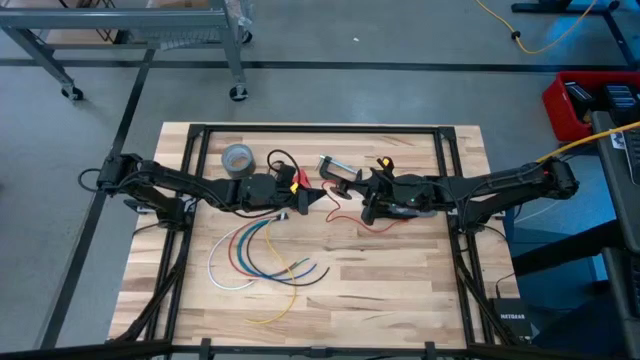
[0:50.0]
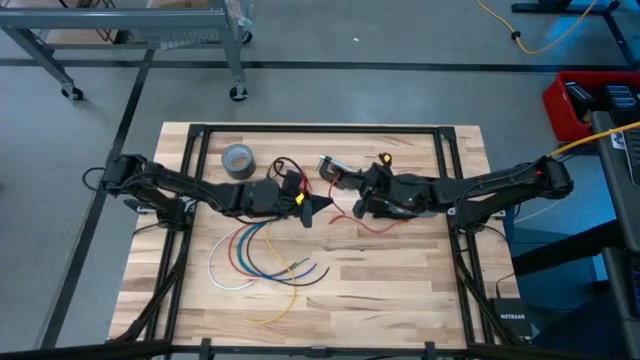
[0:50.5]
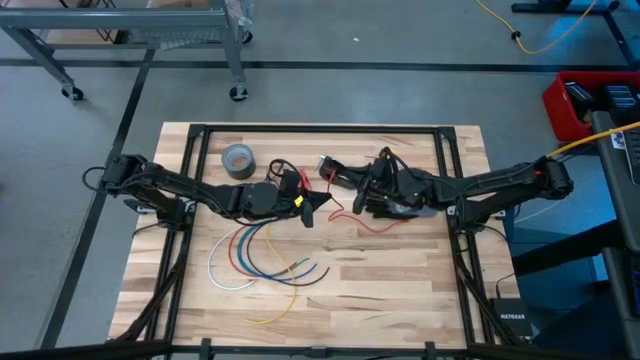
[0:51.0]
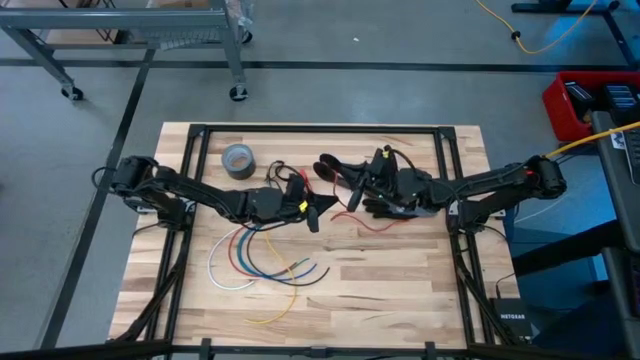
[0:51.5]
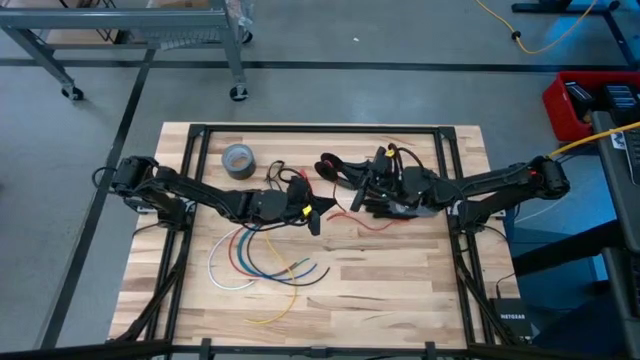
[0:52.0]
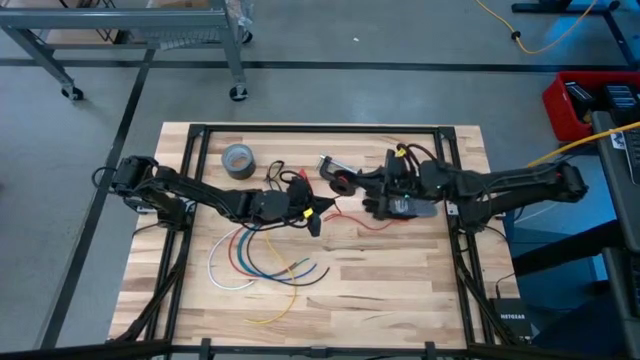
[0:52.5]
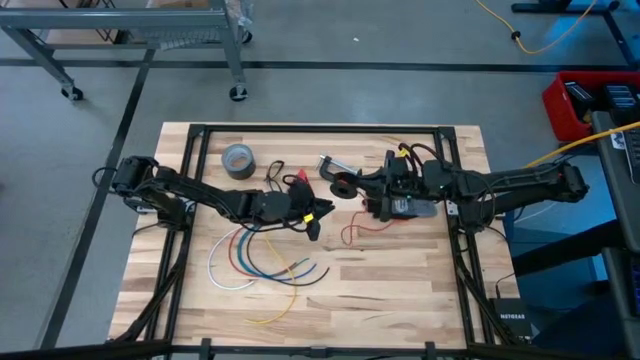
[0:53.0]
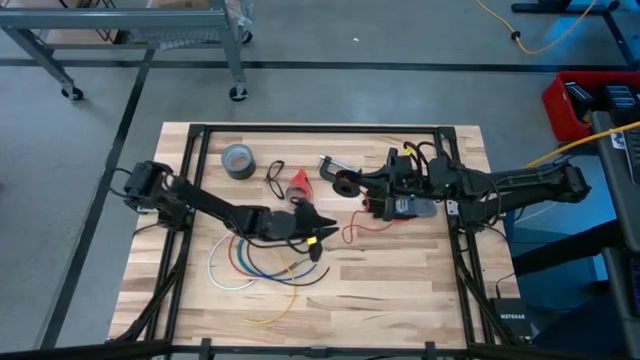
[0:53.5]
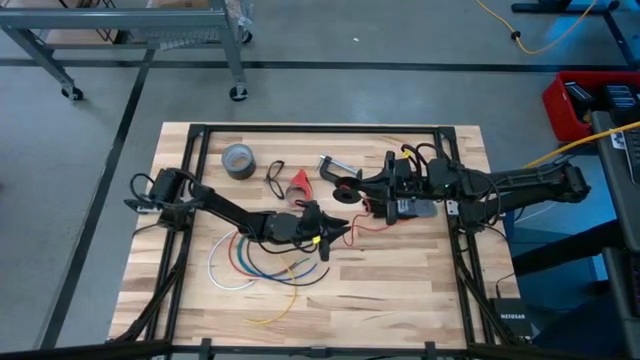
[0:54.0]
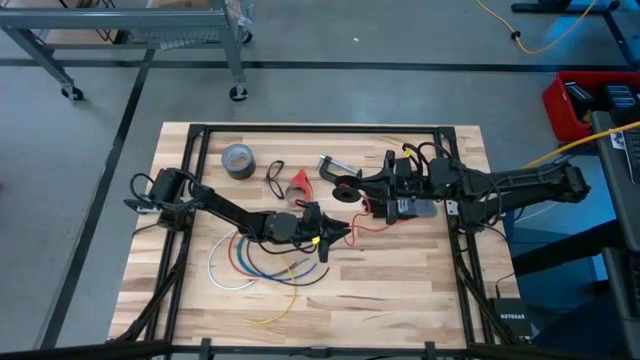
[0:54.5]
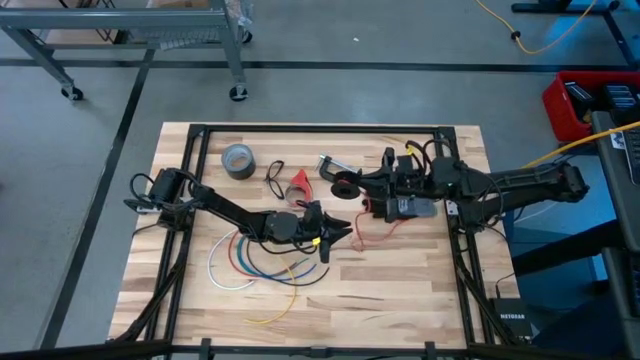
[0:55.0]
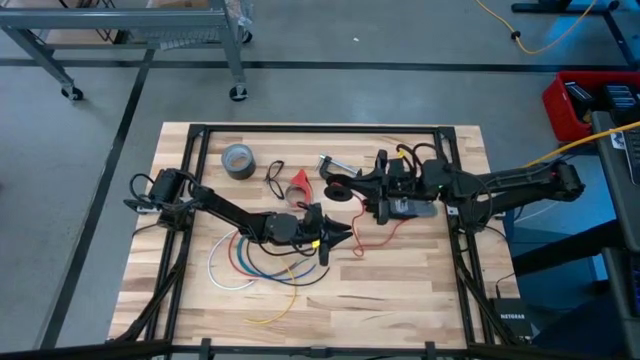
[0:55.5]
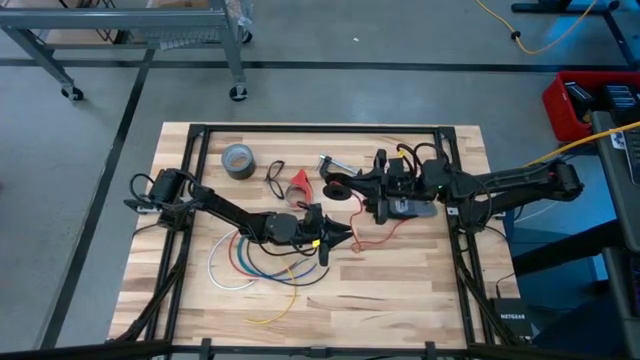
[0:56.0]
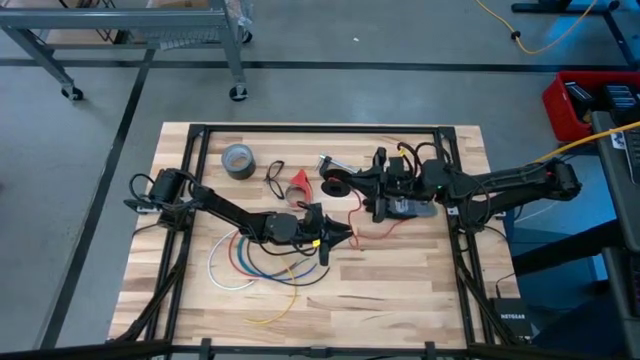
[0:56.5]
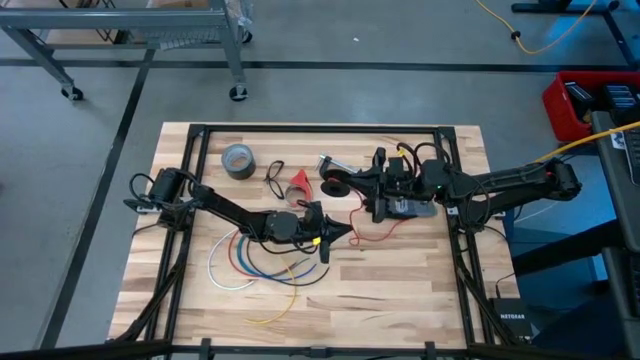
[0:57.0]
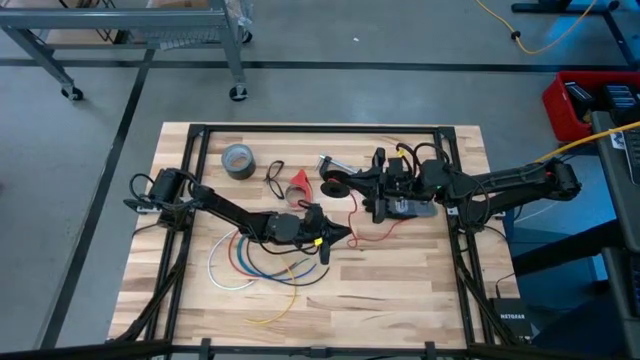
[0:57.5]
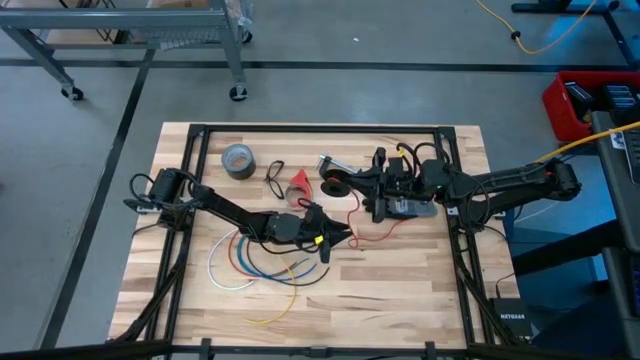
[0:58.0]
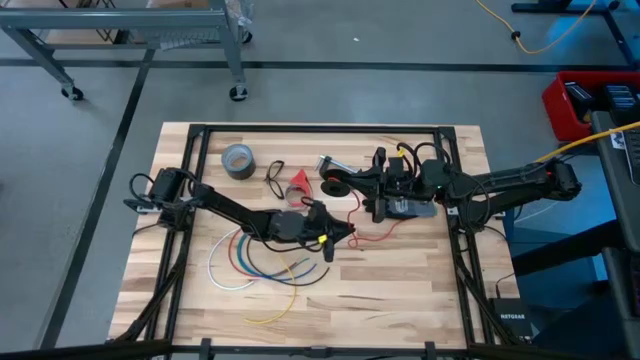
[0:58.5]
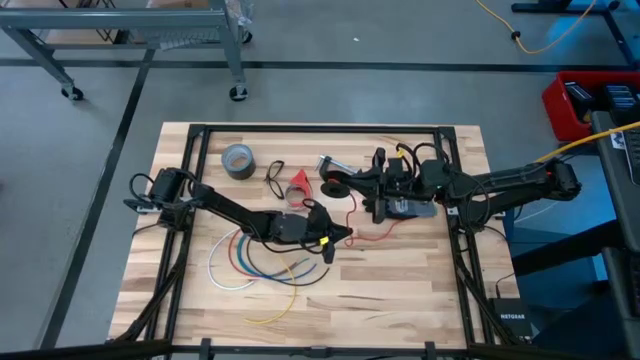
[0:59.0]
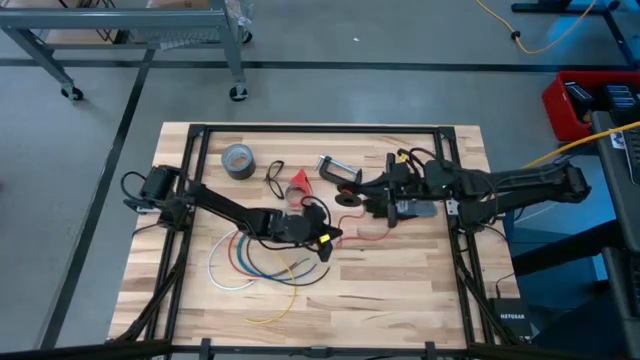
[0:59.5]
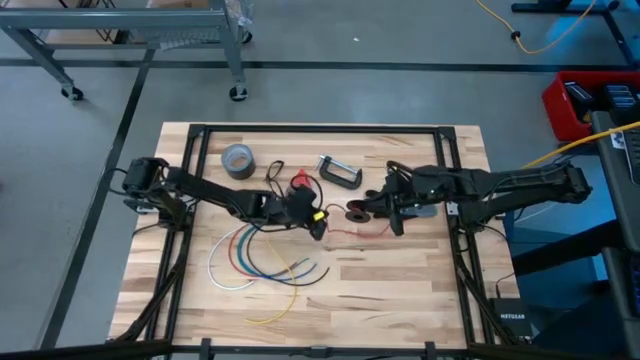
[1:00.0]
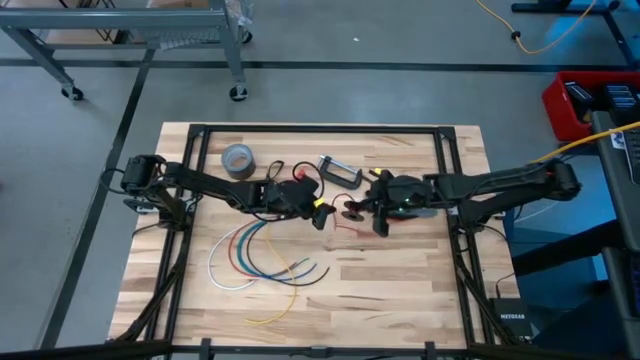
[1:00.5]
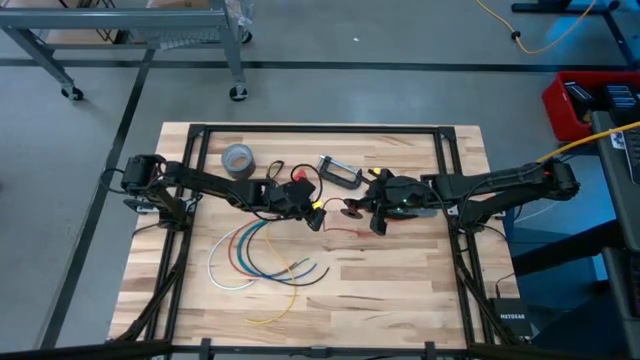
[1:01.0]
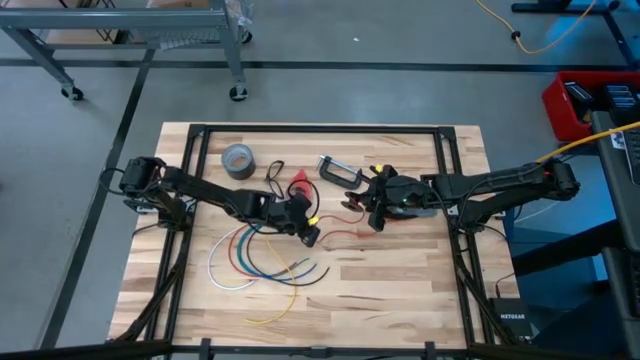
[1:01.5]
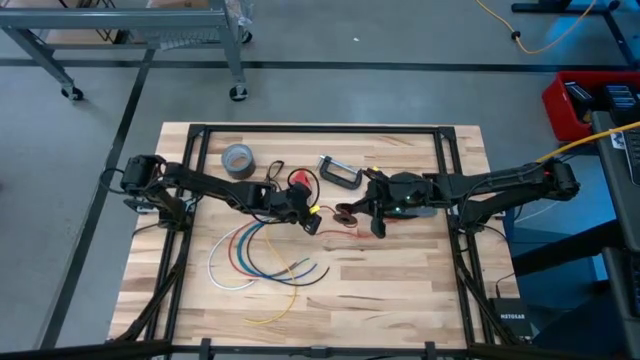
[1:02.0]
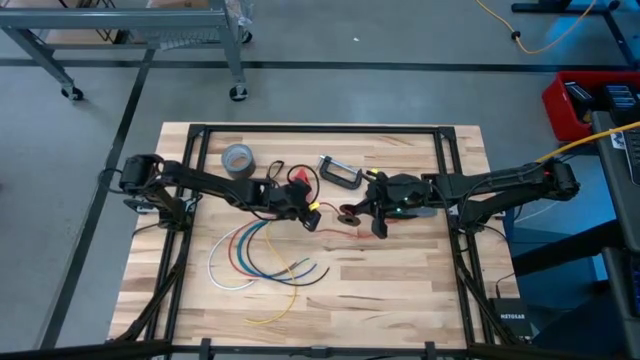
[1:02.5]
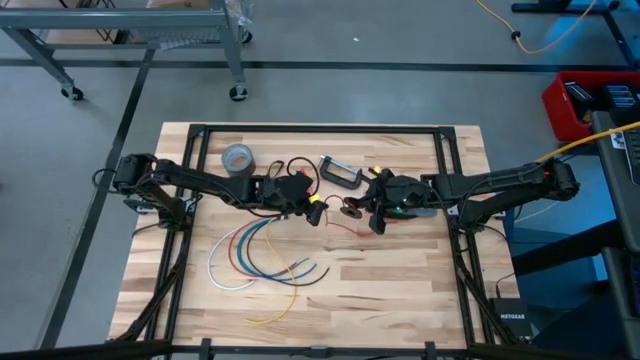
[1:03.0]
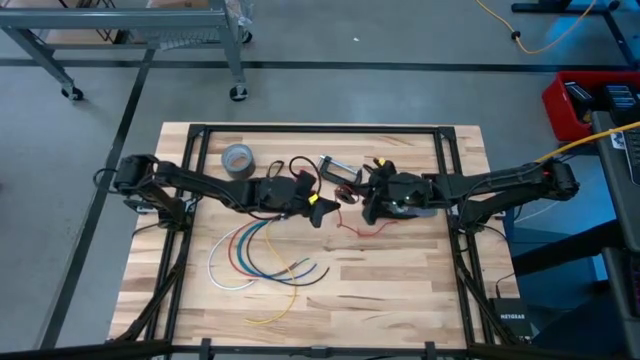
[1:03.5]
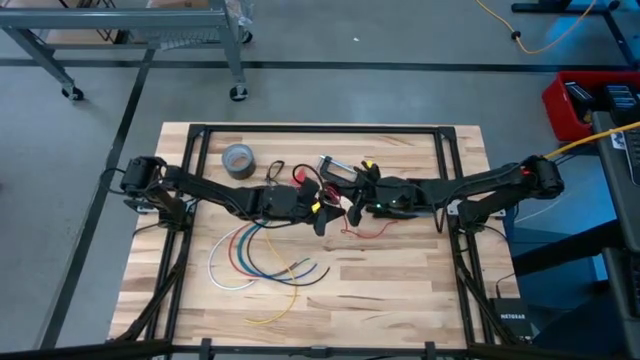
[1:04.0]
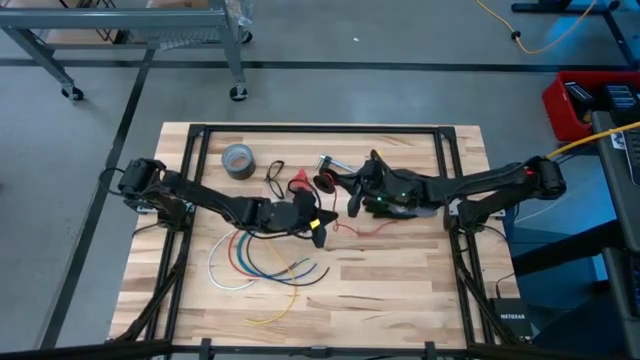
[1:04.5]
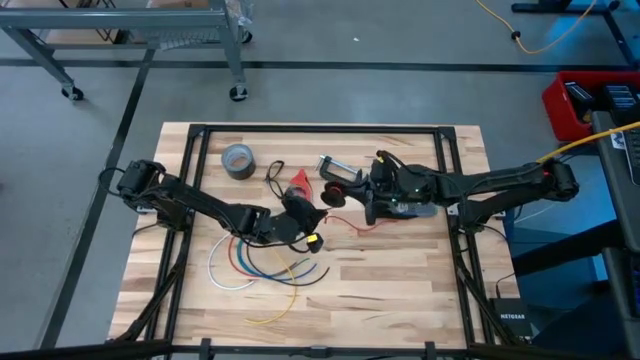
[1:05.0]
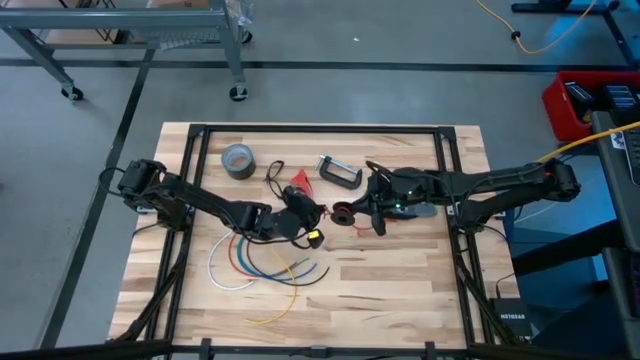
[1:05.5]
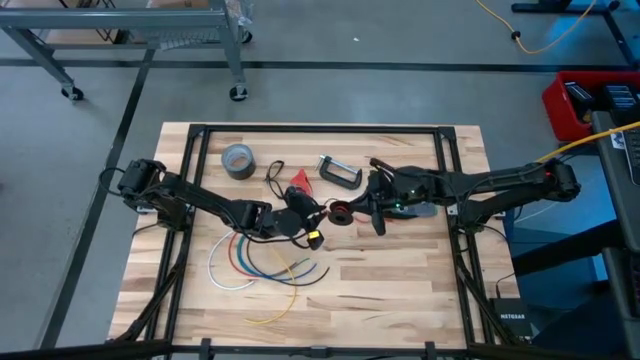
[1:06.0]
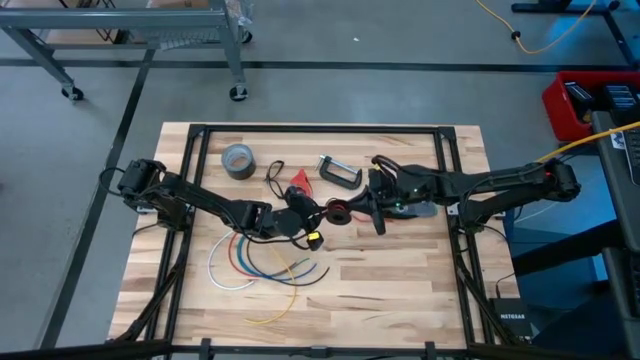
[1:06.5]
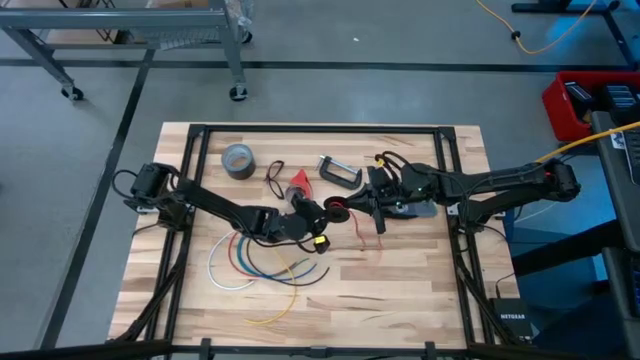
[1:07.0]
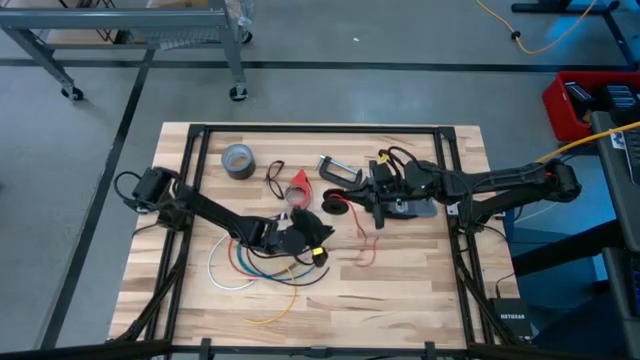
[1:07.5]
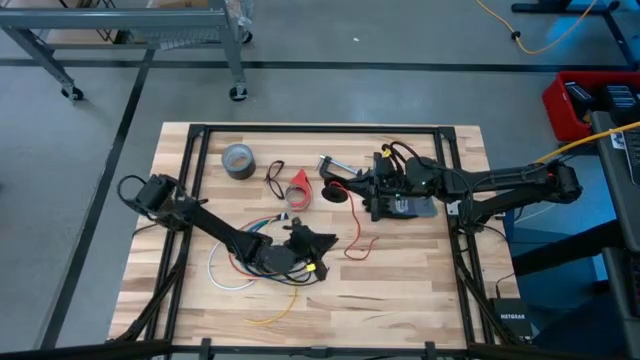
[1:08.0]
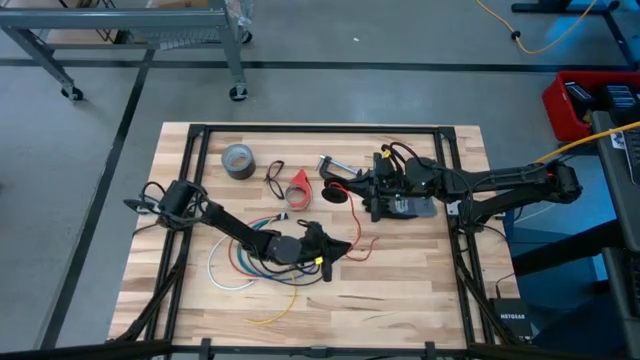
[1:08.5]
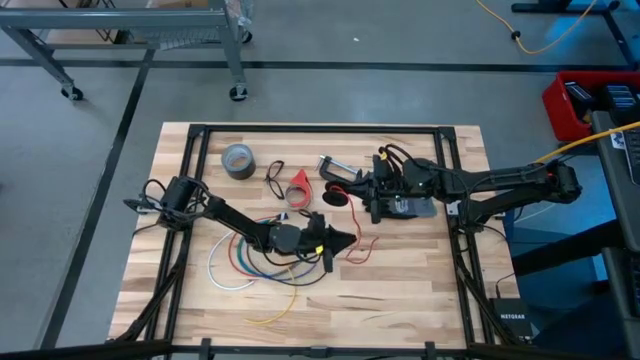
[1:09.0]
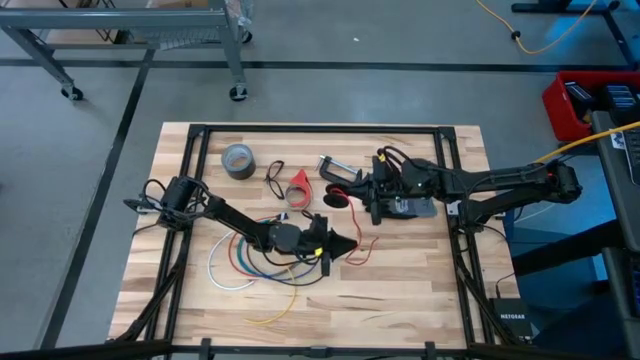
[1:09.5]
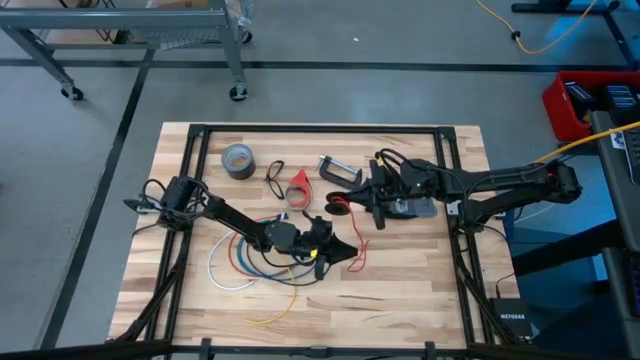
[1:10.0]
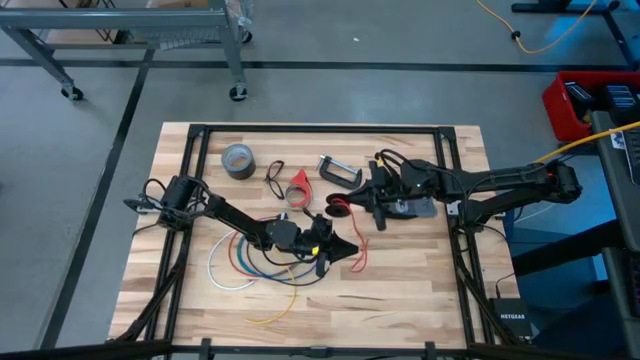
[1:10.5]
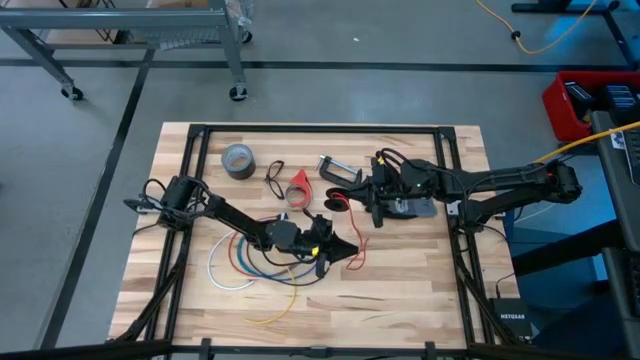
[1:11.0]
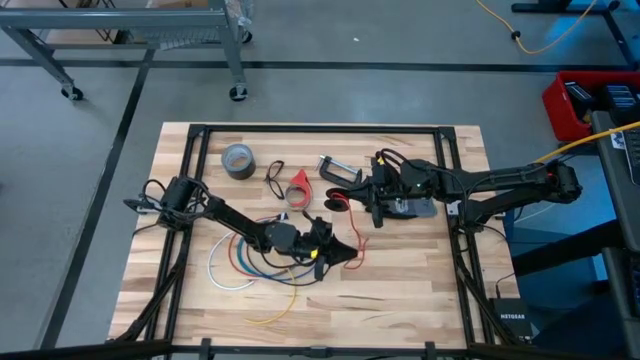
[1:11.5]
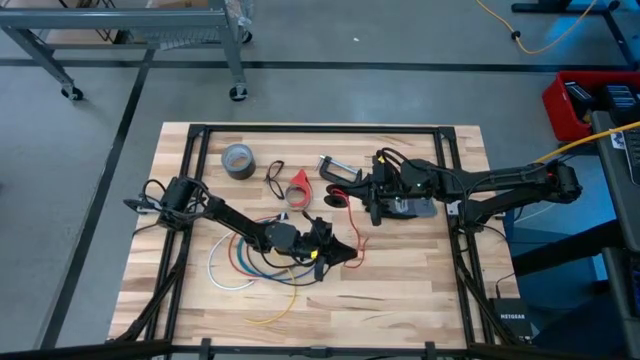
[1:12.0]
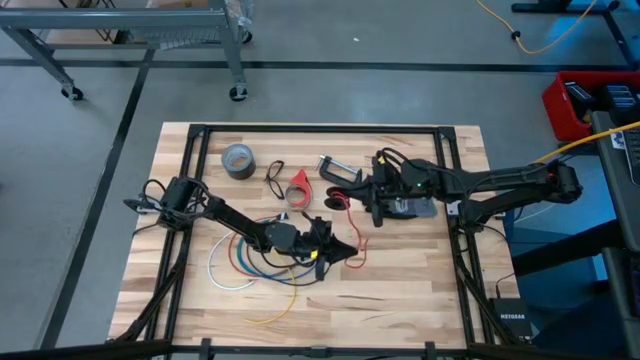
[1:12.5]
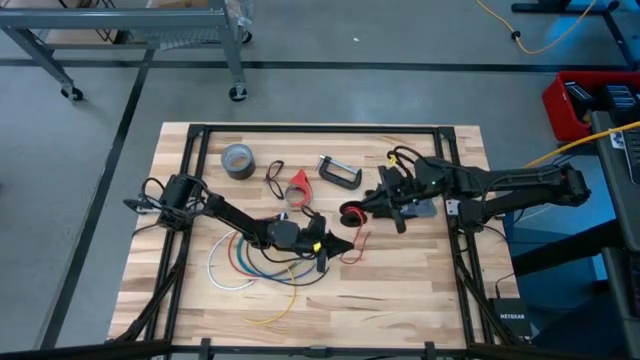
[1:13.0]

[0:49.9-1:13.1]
Task: Coil cords
Coil the orange wire on the spool
